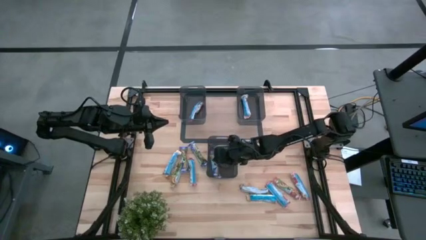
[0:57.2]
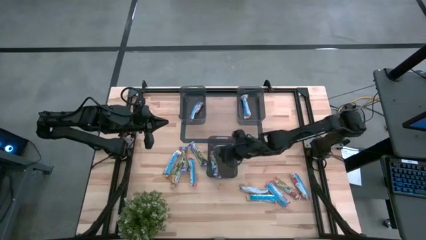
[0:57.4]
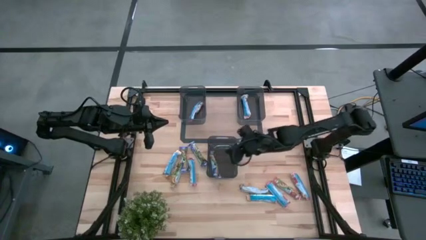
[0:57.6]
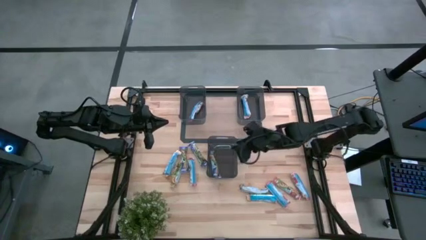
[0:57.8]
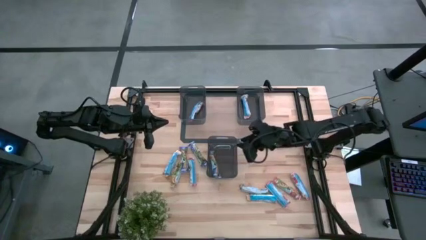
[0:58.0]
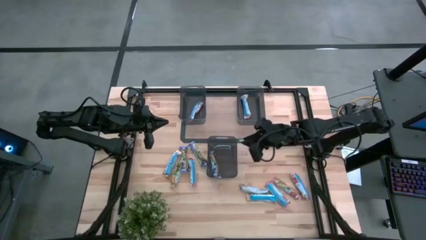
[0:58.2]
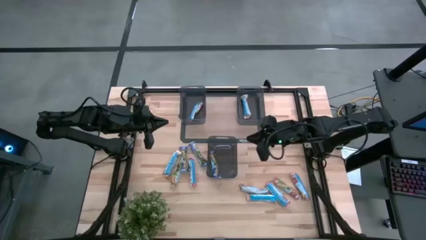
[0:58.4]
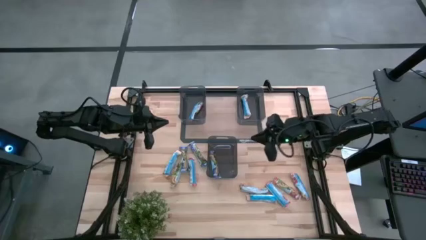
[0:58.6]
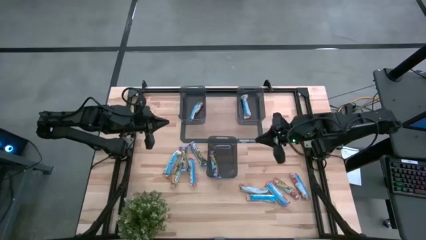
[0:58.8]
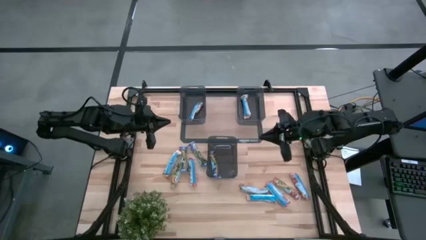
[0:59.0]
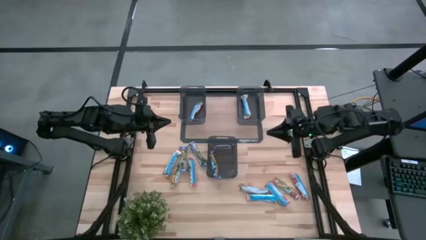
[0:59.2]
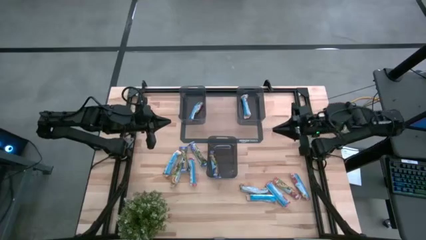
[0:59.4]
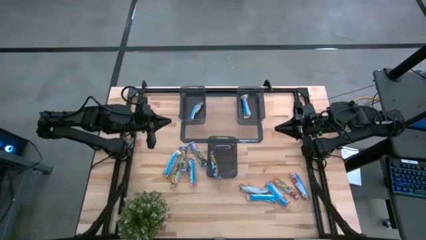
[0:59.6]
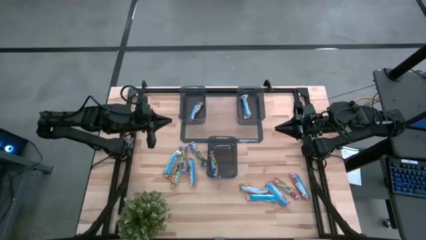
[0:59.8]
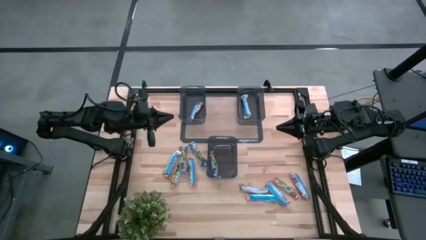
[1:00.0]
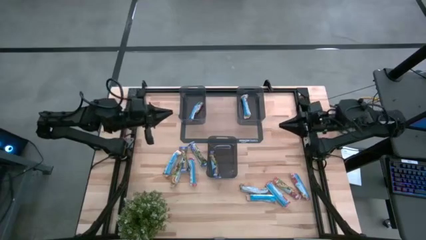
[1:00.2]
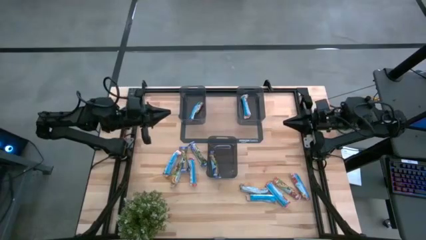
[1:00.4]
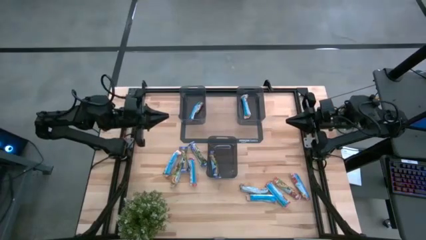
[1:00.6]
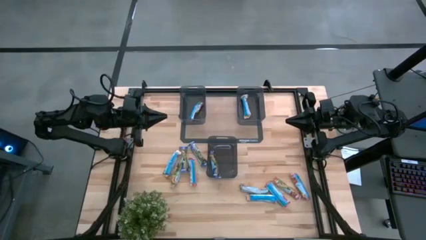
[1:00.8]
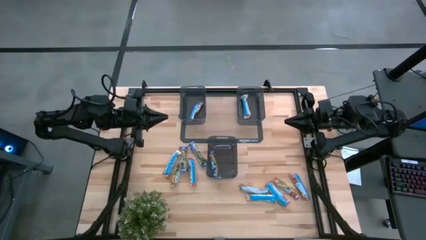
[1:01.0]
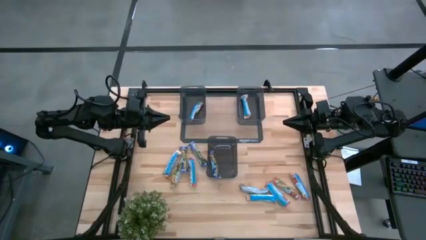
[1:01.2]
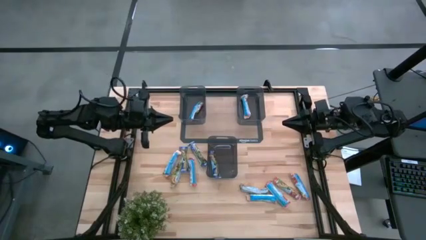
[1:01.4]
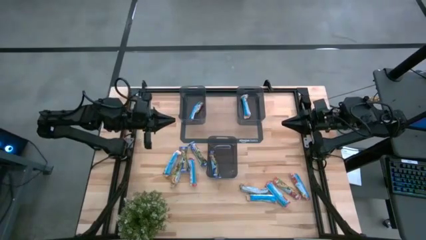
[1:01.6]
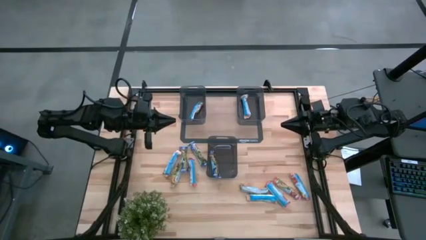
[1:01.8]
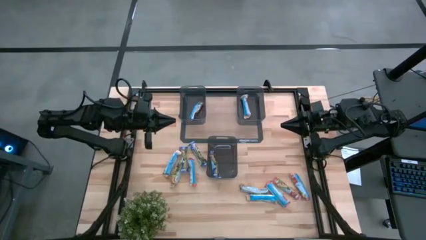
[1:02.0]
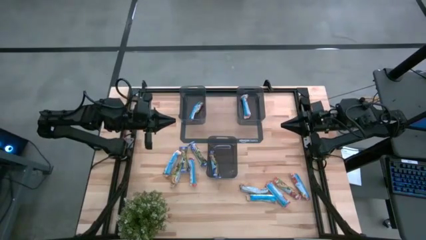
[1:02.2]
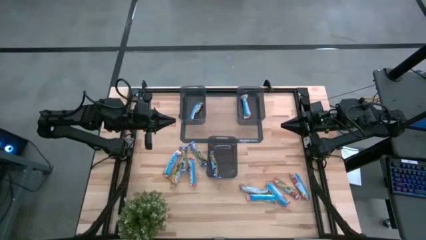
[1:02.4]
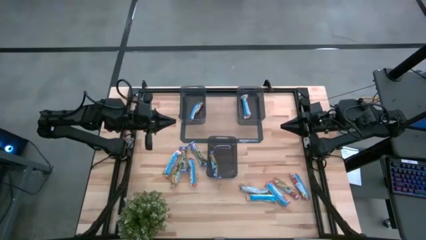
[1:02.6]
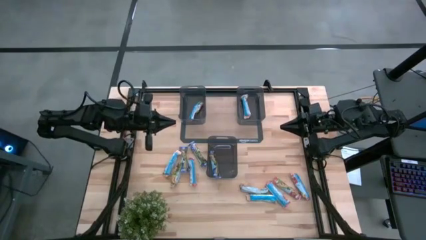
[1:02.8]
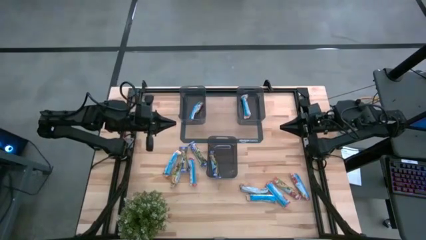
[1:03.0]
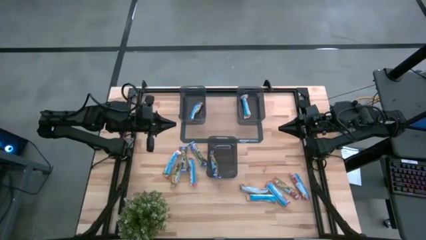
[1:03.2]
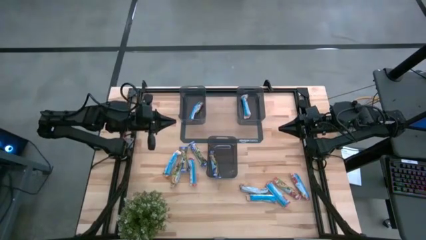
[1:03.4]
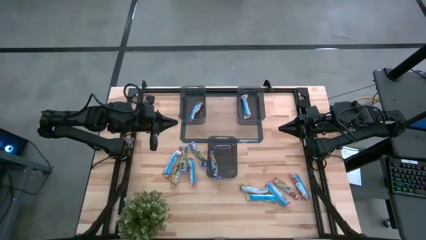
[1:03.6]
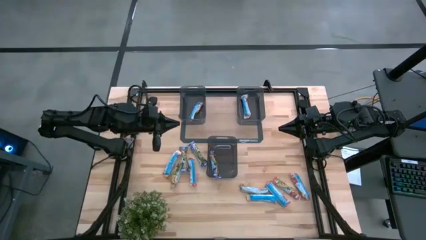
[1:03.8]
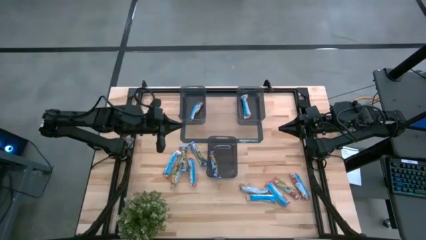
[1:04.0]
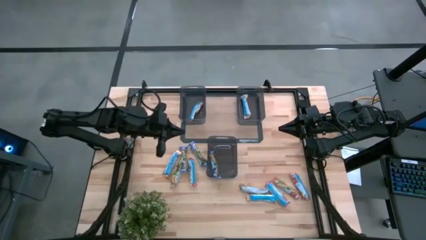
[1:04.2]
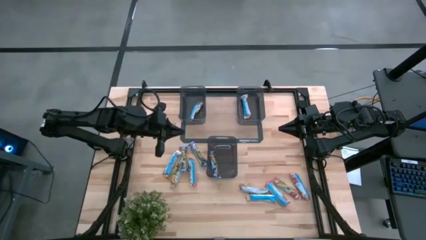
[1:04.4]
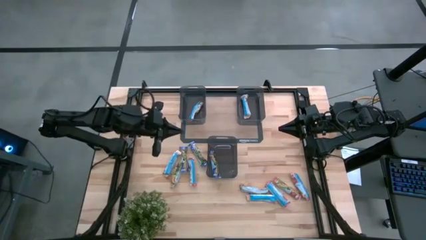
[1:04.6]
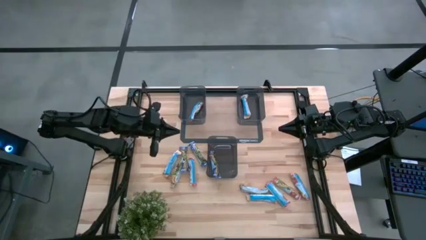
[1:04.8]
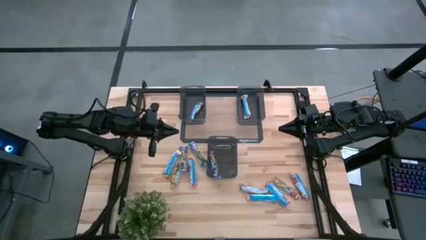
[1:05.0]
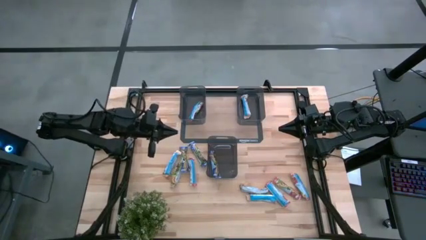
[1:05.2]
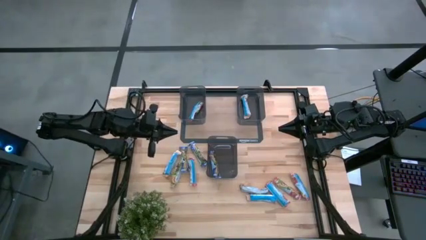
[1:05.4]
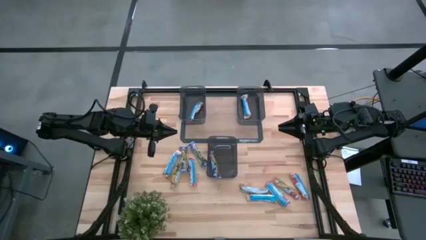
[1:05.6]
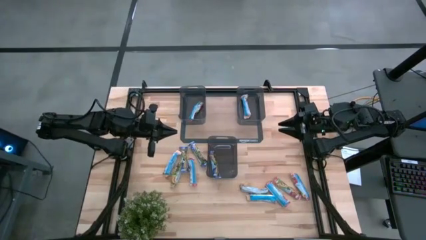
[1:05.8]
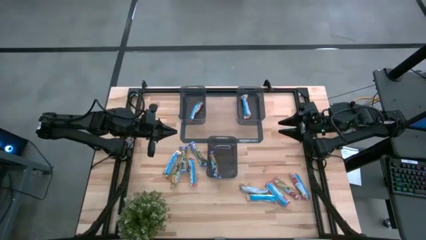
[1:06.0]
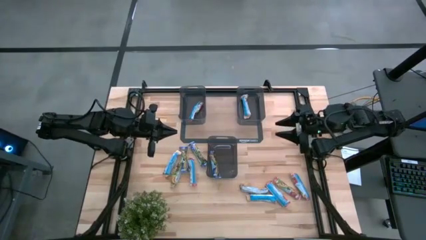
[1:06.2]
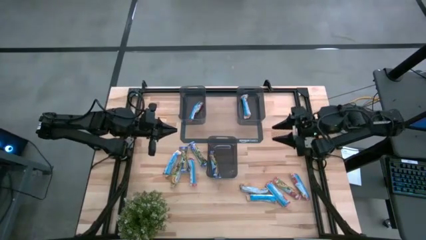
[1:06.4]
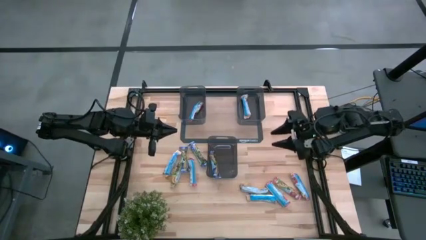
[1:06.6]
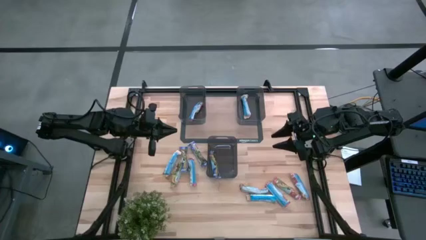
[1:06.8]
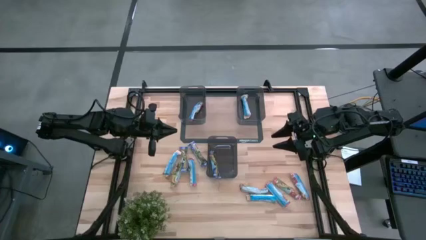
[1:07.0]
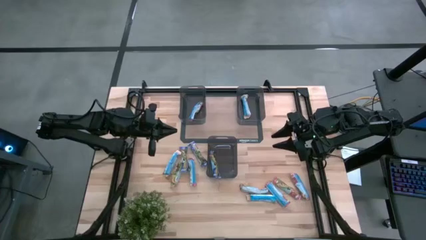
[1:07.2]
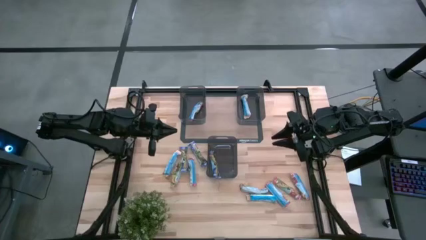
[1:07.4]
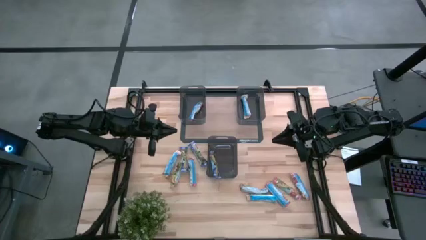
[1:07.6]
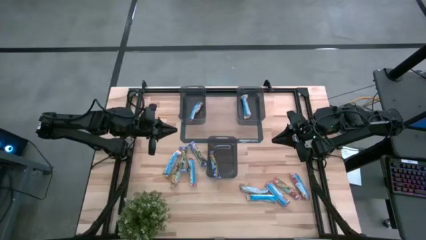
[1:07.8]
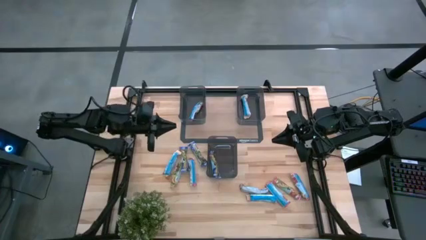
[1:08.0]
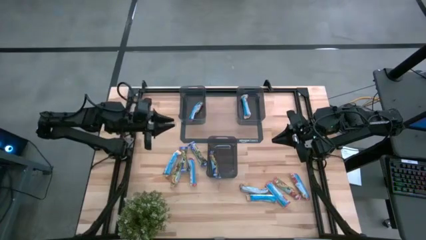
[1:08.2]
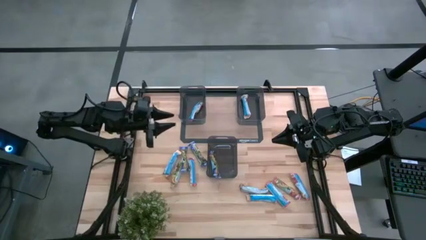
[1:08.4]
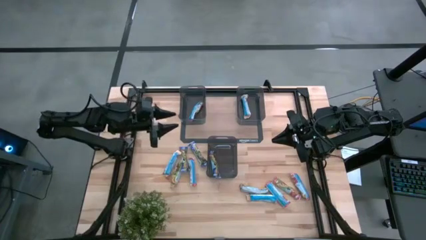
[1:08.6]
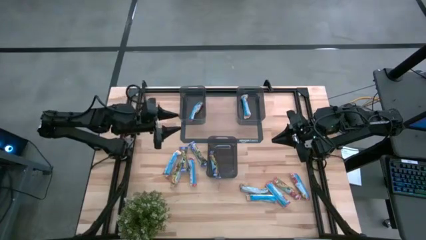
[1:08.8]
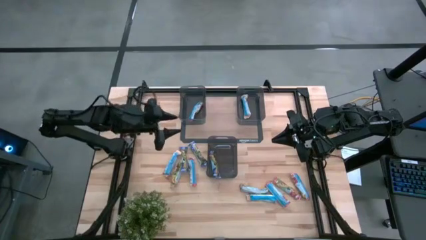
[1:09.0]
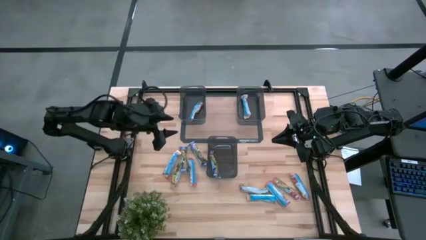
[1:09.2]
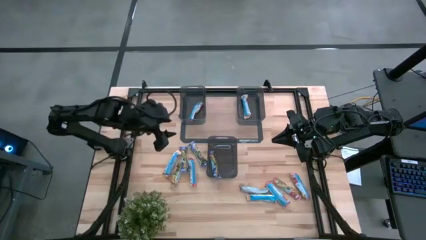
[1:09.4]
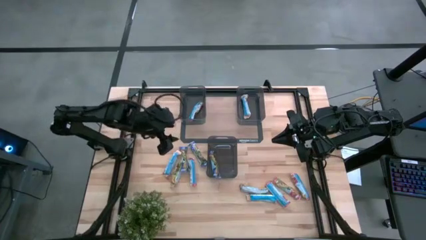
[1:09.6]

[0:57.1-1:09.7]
Task: Pick and place Granola Bars by type
Put the yellow granola bar into the right black bin
